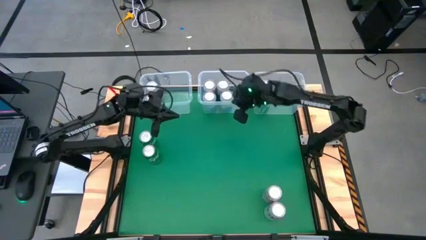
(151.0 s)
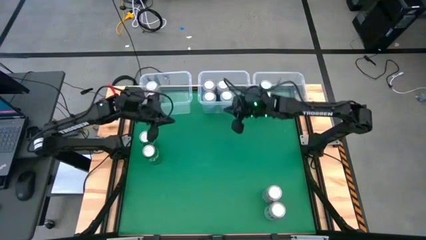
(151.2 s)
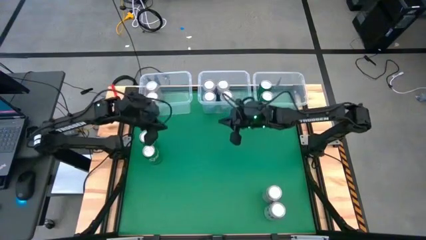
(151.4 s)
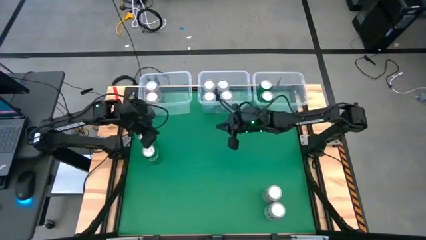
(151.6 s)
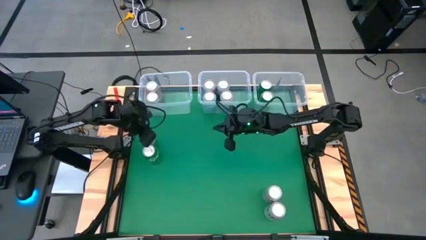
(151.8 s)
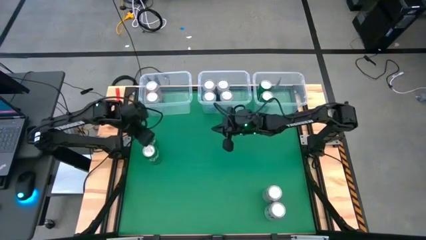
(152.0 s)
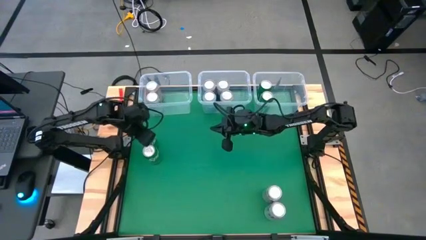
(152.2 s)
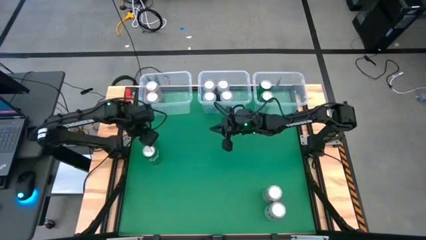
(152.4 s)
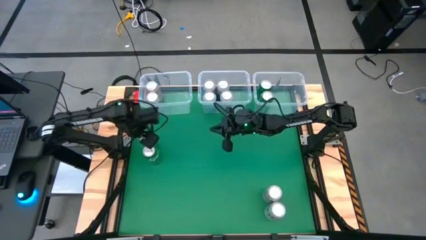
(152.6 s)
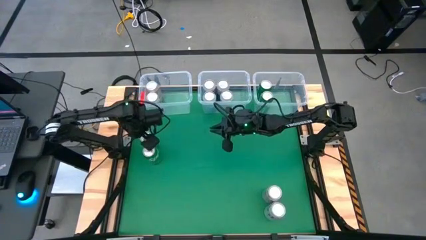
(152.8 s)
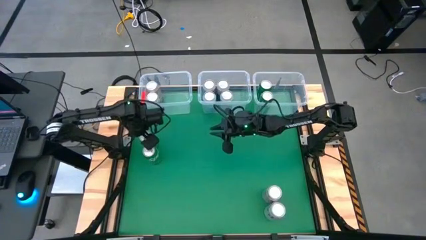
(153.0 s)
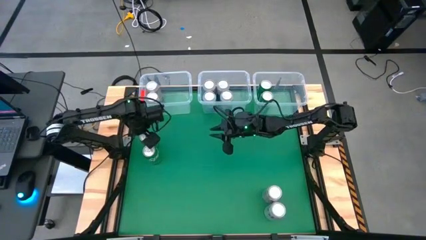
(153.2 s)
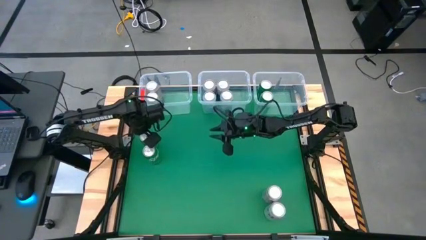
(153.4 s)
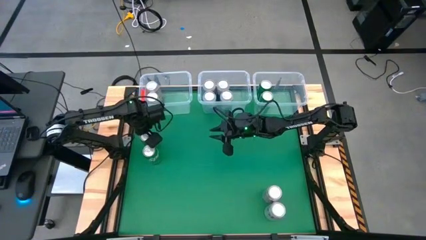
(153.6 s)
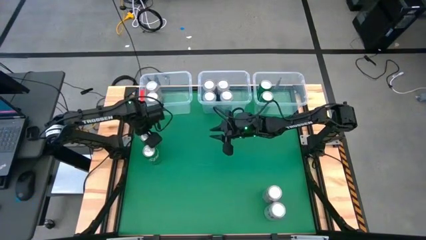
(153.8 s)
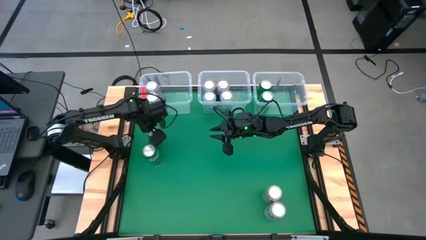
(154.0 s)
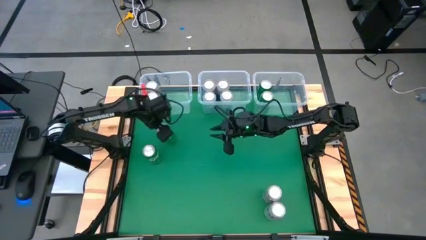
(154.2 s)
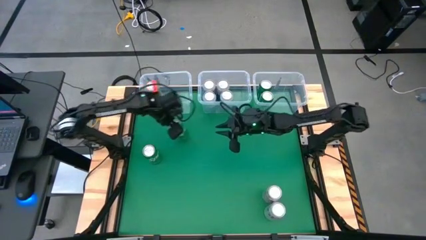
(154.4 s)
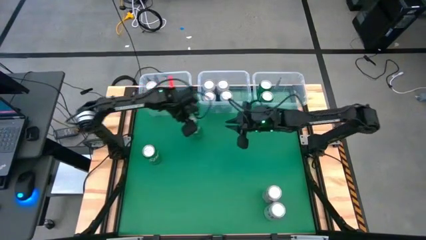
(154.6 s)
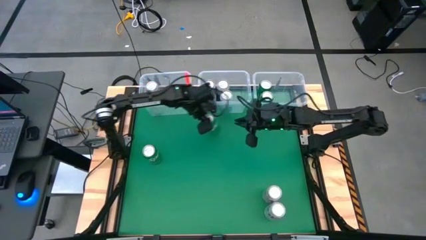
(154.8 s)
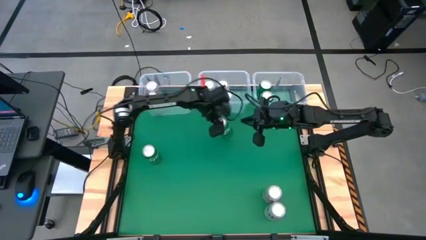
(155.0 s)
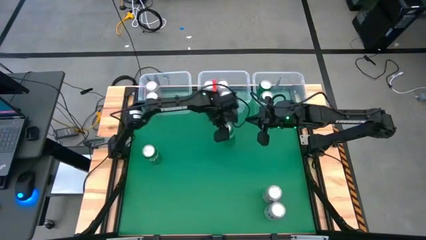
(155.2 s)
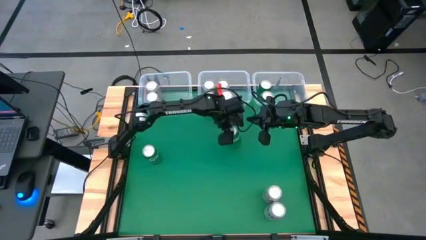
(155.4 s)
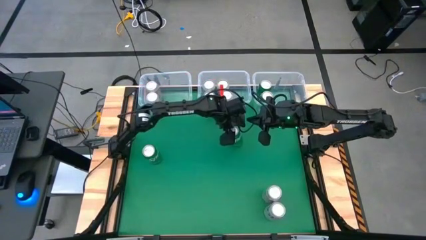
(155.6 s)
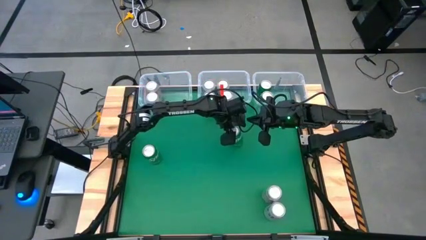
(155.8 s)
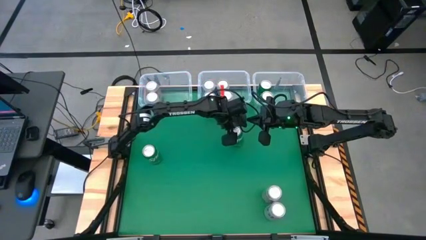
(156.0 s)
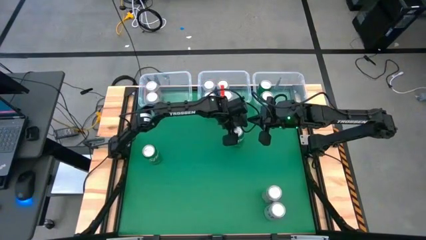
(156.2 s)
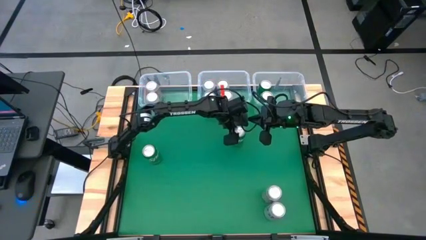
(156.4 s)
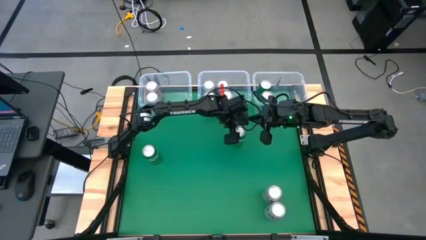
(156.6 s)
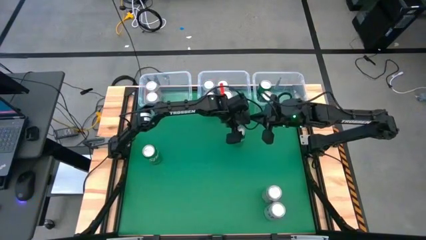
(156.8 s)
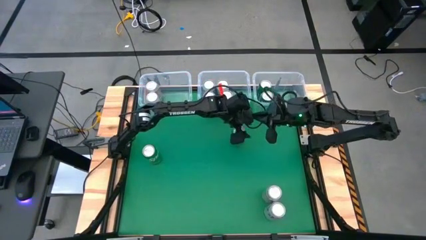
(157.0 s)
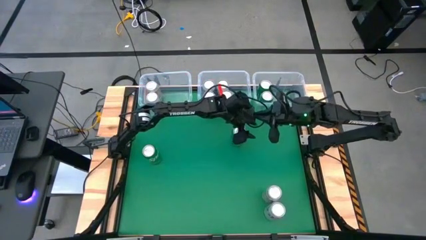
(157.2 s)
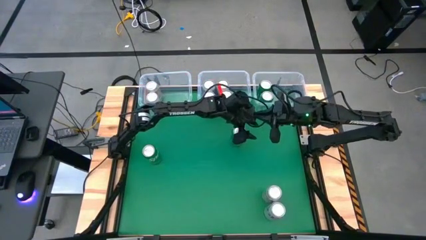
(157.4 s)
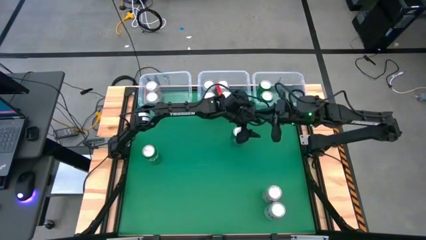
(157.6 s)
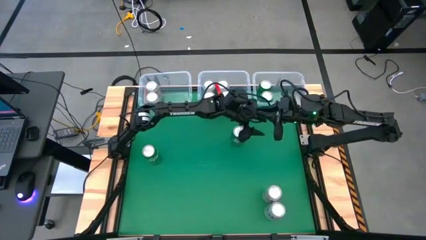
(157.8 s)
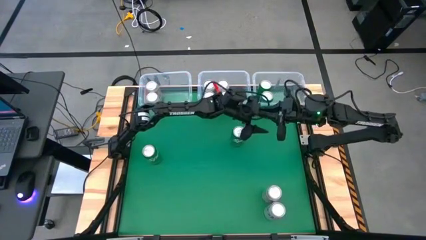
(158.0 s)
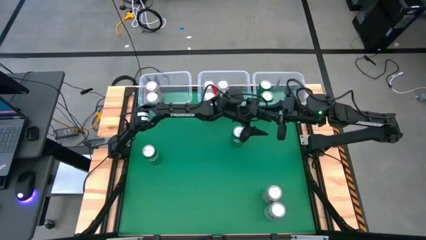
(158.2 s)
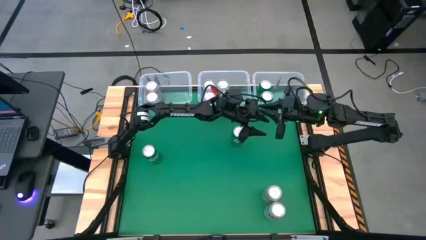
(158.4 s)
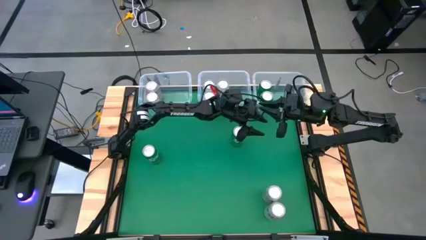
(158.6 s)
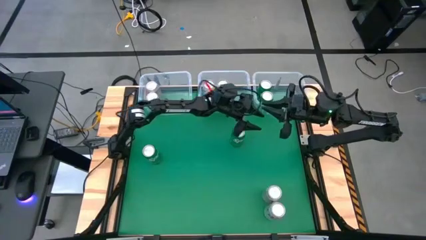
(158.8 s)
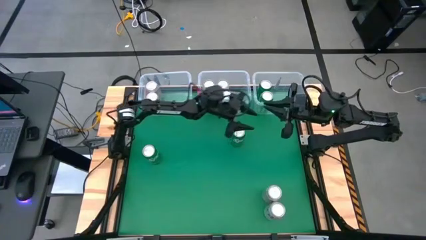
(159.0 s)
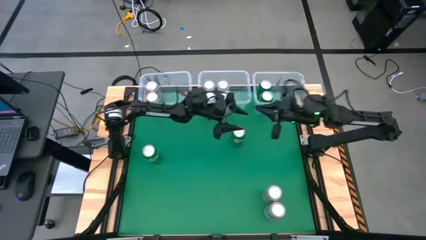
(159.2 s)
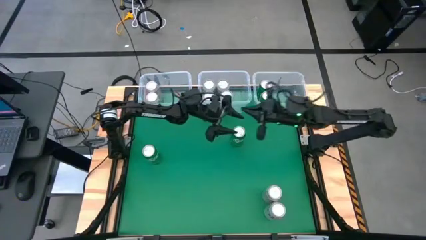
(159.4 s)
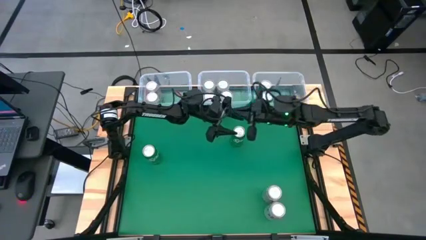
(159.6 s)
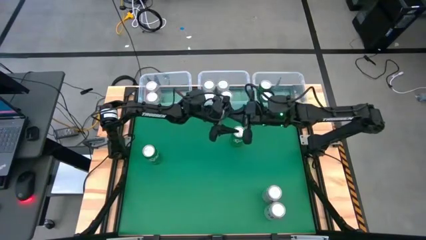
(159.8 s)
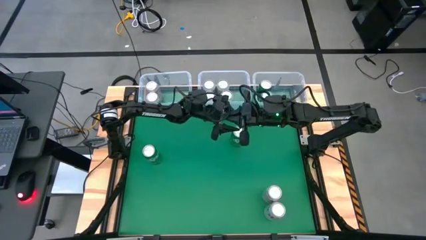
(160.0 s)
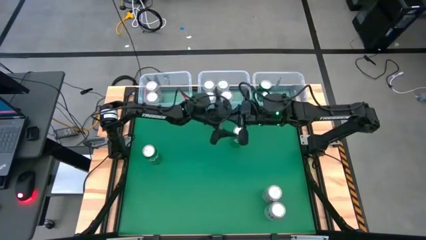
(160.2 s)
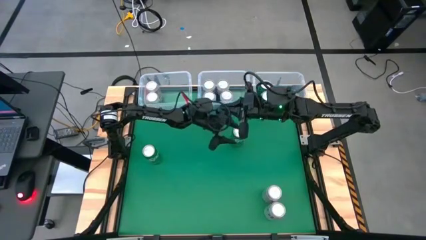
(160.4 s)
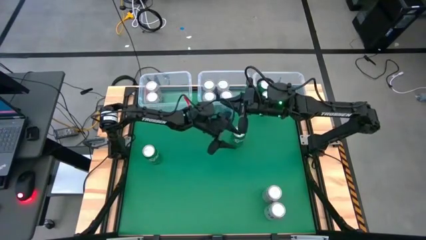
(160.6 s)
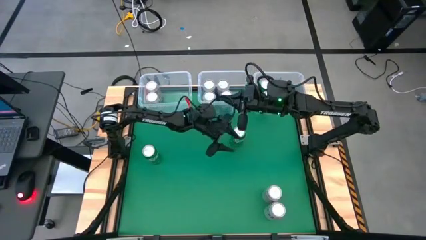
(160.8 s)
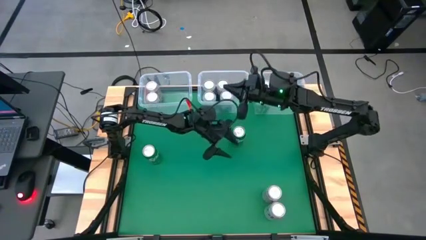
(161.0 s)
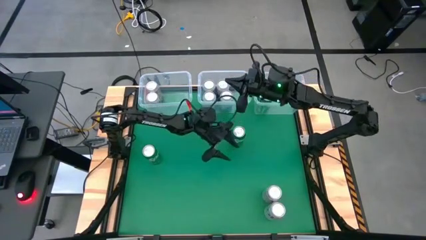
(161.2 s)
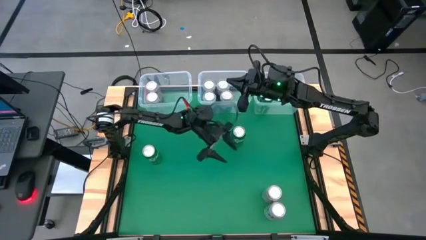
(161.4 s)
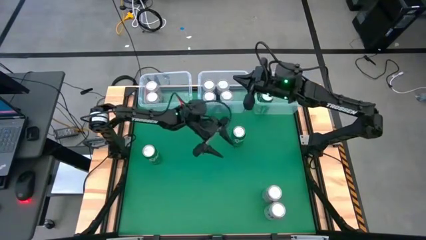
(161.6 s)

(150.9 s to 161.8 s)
Task: Sort soda cans
Put the top green soda can into the right transparent bin

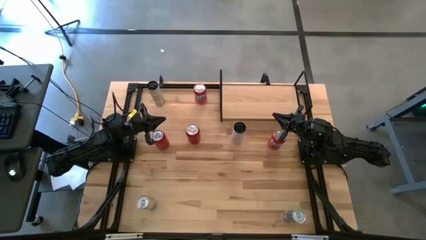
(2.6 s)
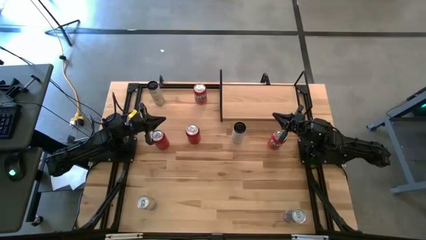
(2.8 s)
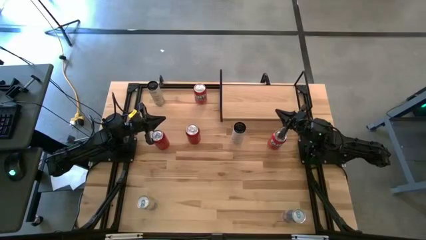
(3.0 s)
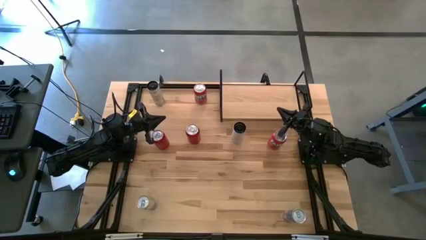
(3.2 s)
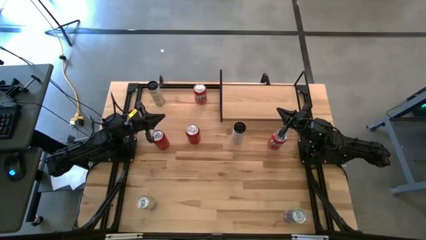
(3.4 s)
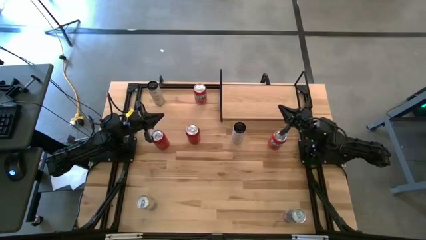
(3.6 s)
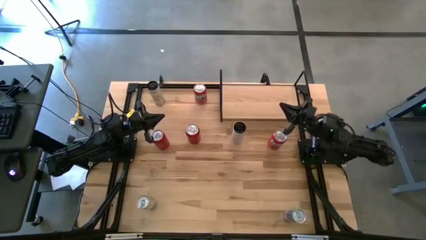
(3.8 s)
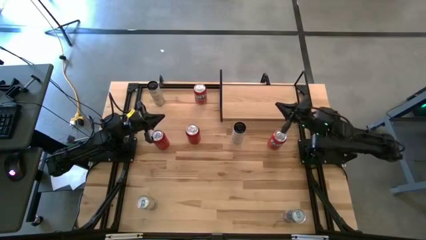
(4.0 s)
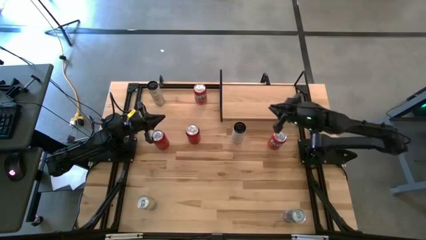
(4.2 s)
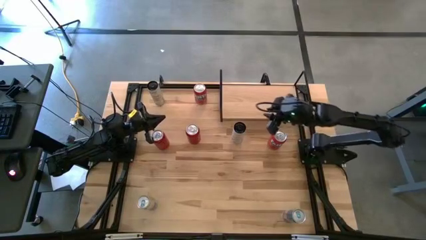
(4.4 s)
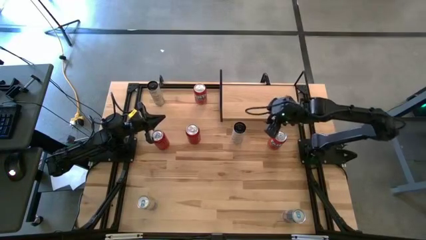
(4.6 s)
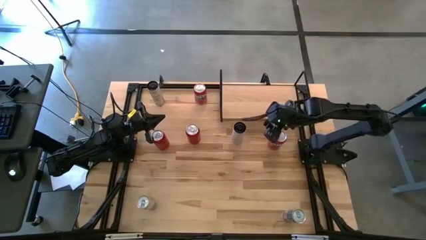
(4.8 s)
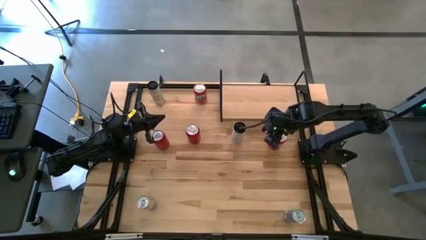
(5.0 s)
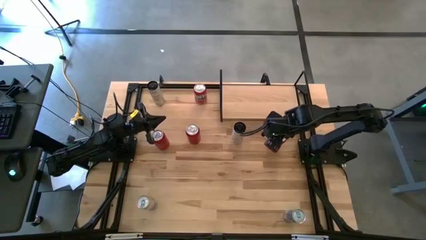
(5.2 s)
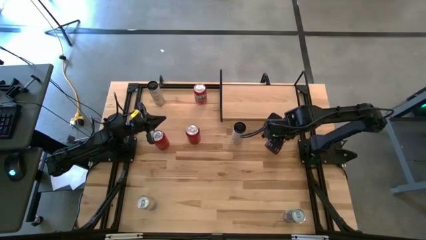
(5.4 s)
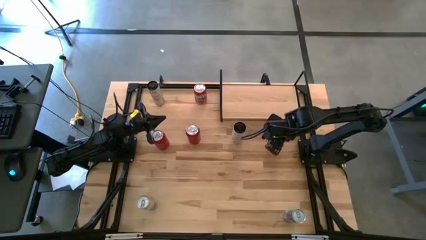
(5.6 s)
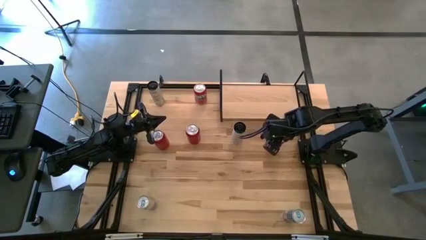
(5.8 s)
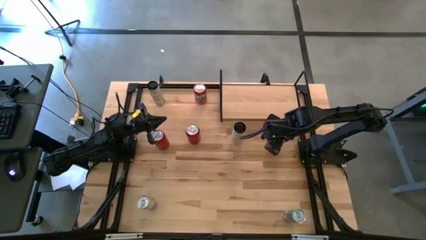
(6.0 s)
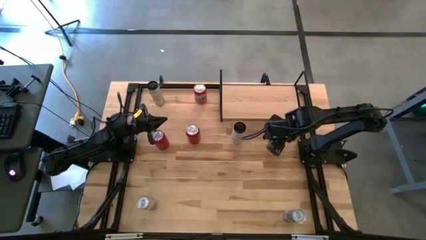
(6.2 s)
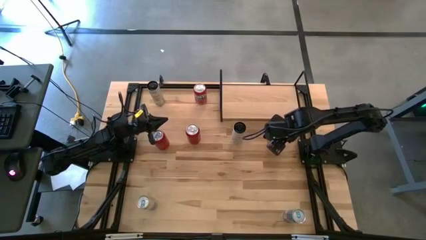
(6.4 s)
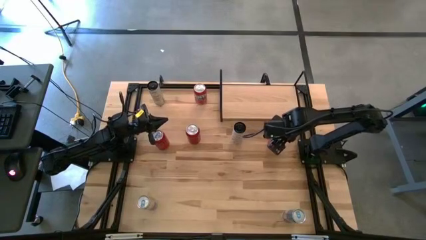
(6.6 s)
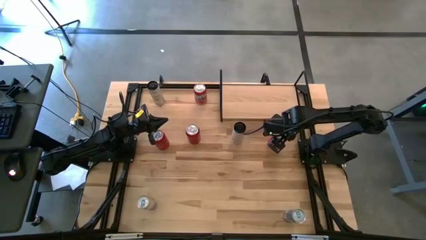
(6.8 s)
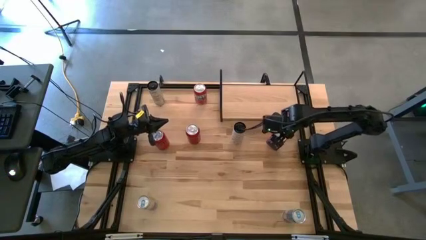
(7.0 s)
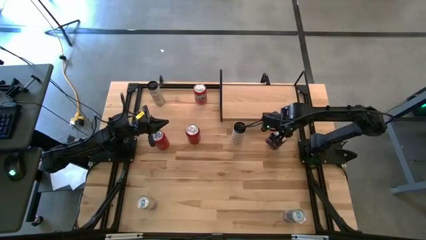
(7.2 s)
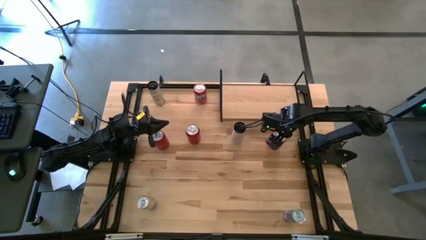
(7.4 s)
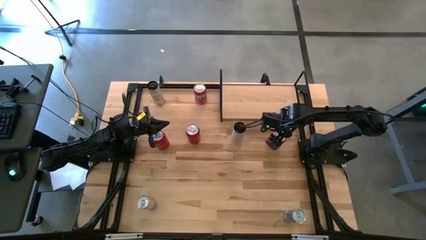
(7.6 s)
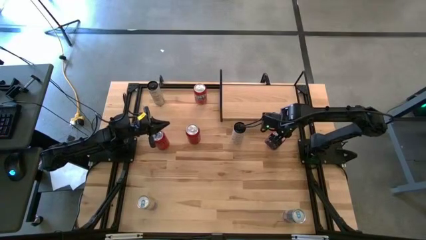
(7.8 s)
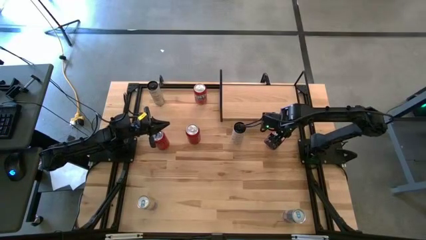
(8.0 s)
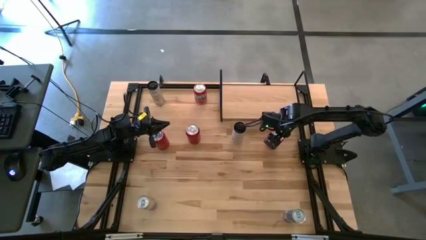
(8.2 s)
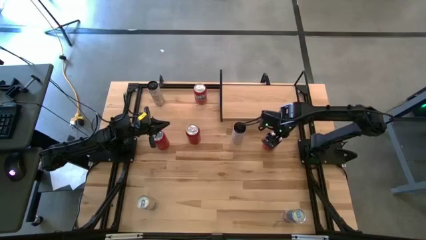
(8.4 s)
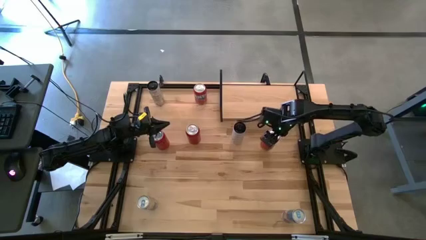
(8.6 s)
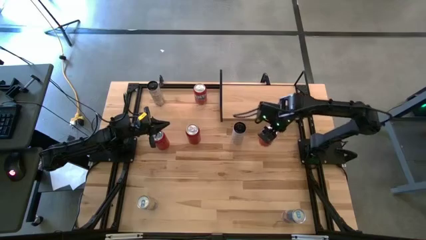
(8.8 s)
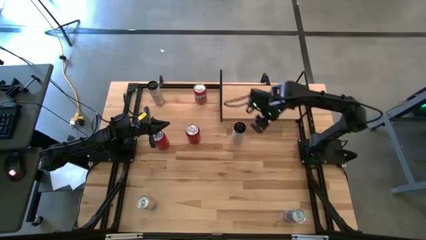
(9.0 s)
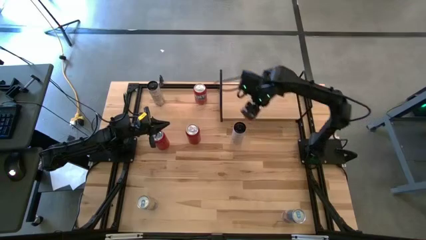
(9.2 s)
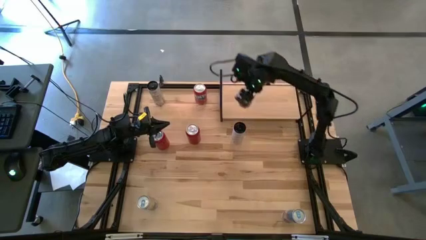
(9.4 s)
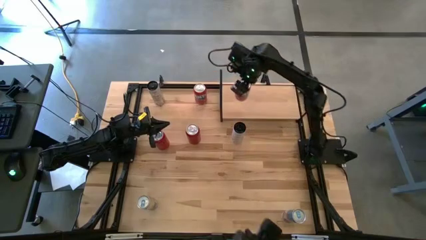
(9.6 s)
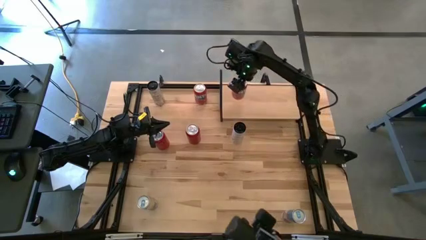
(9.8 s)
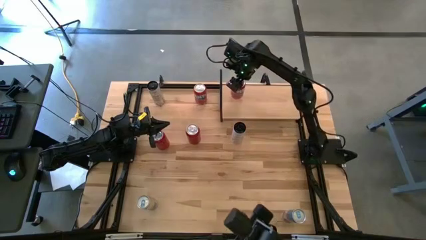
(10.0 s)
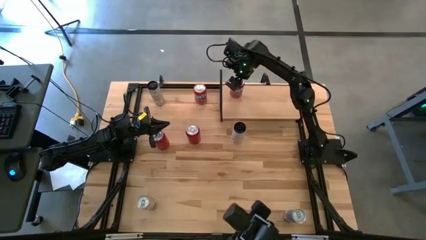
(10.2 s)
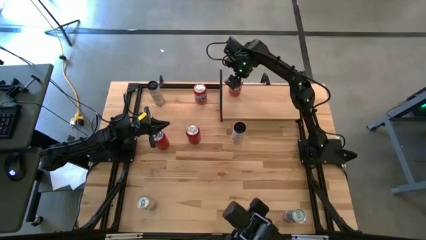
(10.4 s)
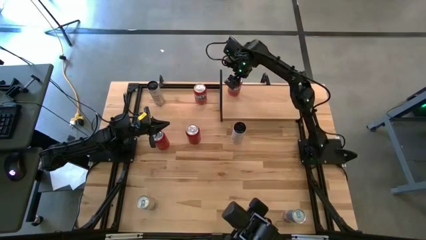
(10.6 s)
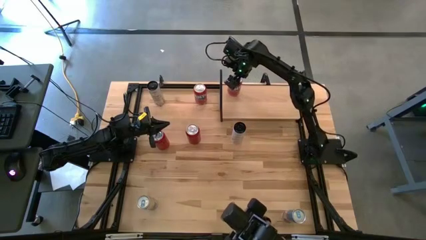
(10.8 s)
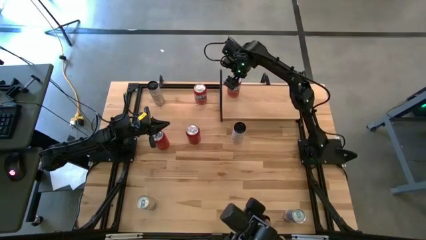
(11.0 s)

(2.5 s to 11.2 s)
Task: Place canned beverage on shelf
Put the right orange soda can on the shelf
